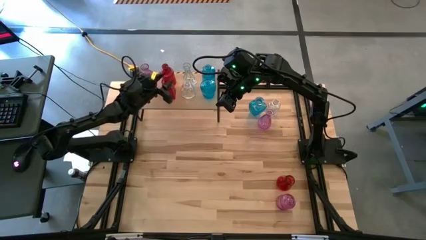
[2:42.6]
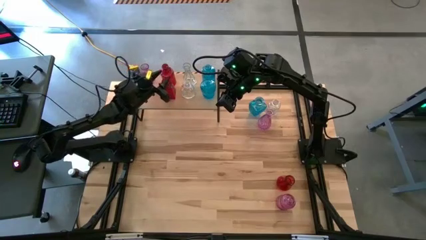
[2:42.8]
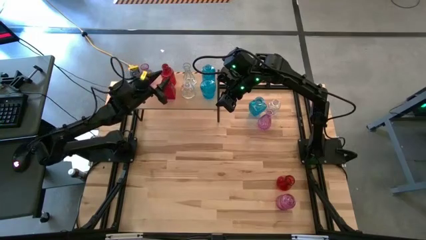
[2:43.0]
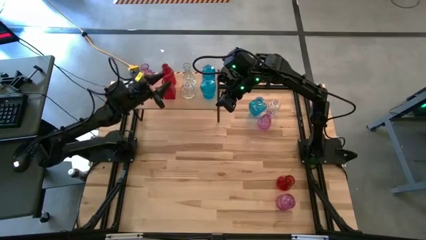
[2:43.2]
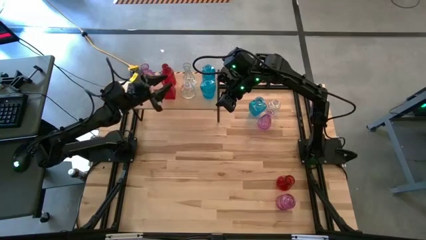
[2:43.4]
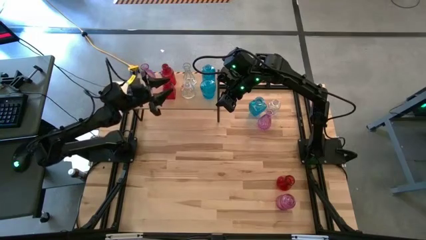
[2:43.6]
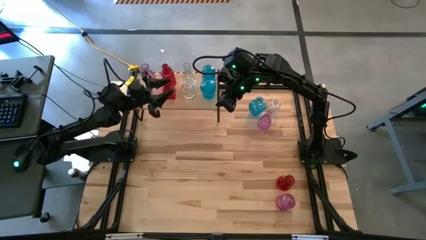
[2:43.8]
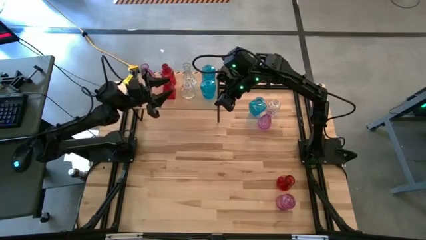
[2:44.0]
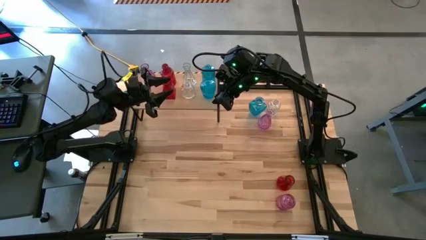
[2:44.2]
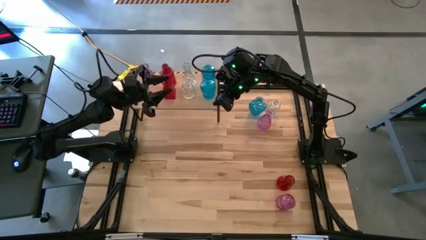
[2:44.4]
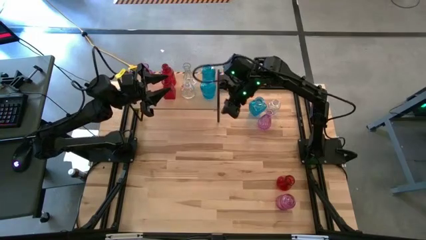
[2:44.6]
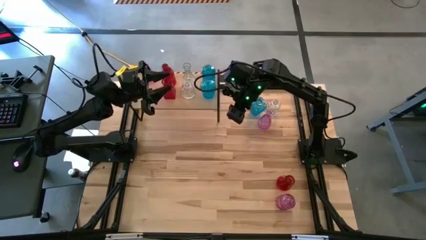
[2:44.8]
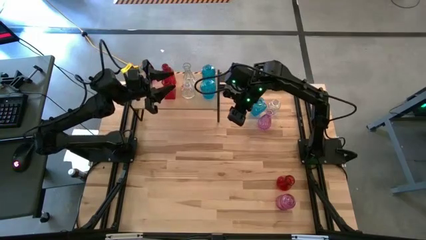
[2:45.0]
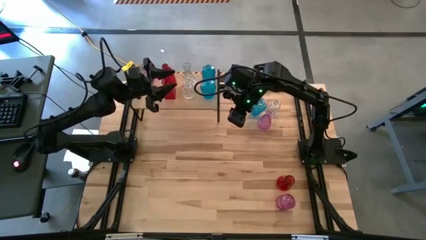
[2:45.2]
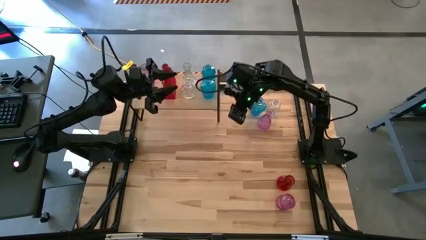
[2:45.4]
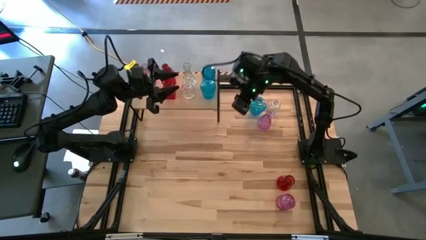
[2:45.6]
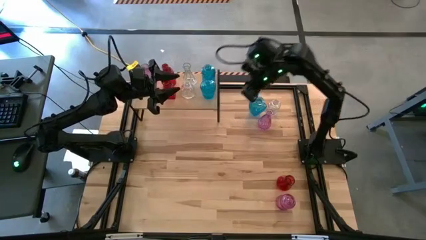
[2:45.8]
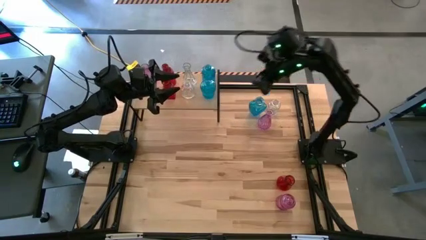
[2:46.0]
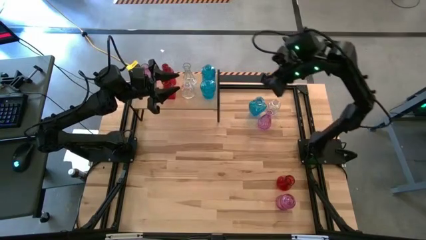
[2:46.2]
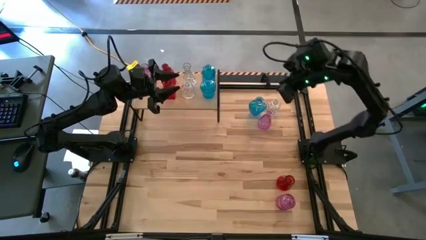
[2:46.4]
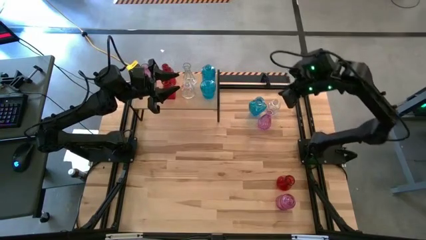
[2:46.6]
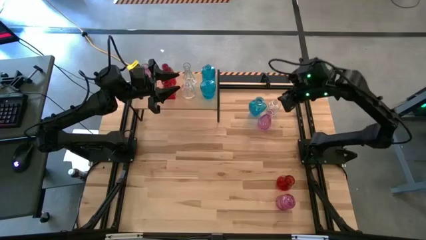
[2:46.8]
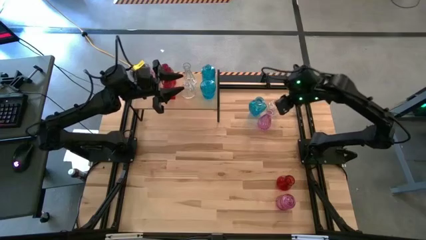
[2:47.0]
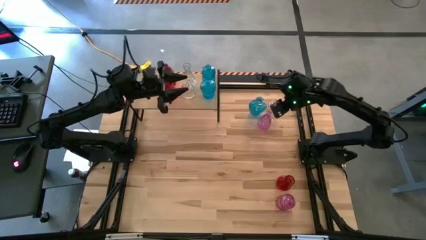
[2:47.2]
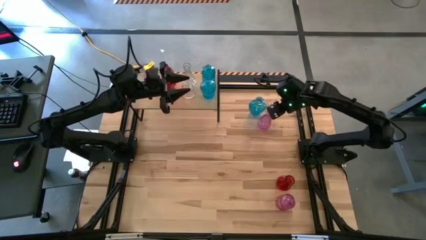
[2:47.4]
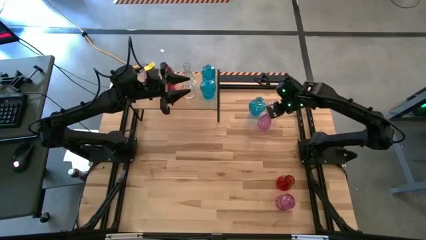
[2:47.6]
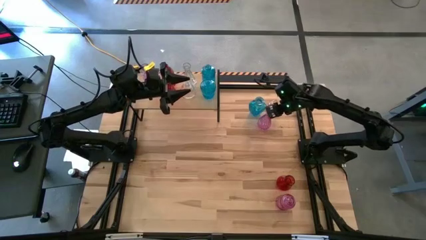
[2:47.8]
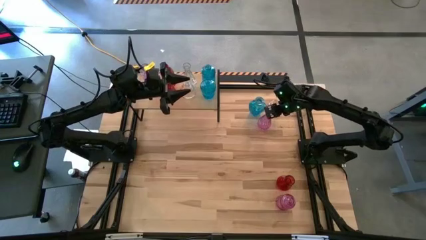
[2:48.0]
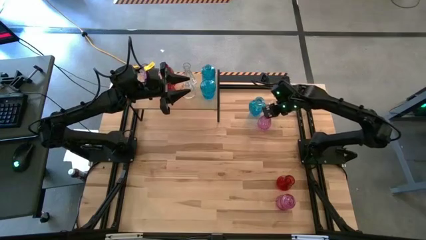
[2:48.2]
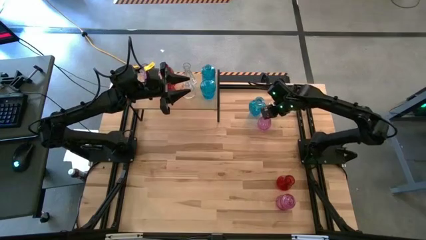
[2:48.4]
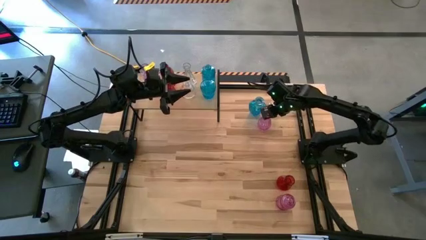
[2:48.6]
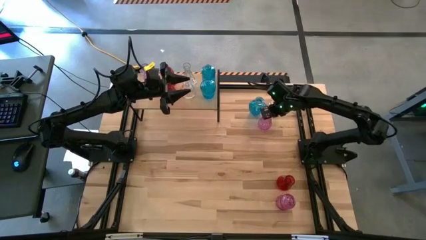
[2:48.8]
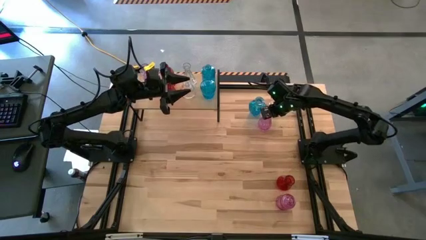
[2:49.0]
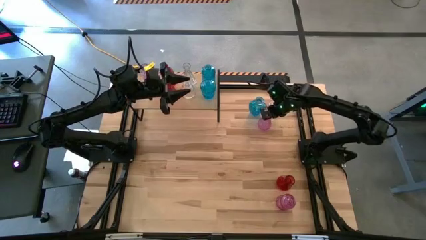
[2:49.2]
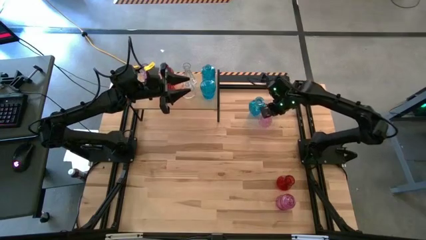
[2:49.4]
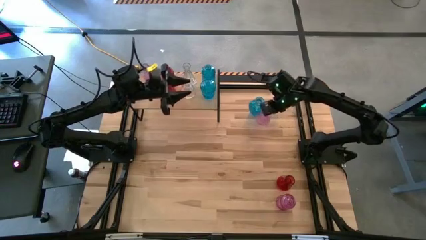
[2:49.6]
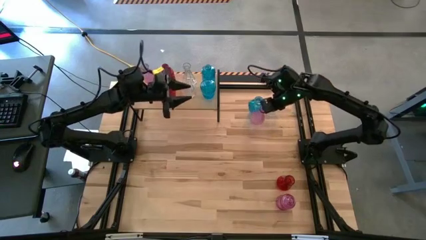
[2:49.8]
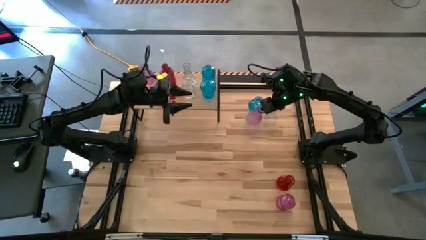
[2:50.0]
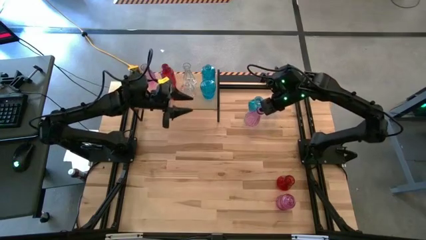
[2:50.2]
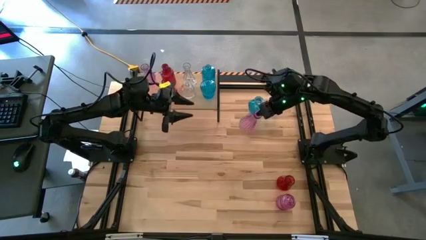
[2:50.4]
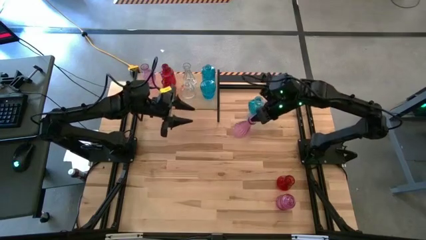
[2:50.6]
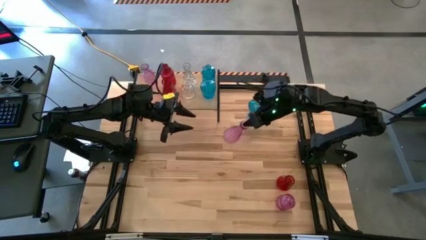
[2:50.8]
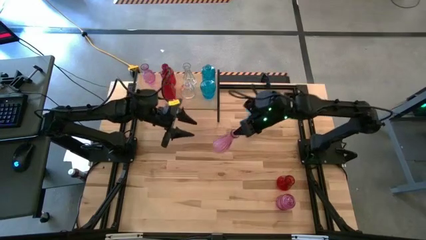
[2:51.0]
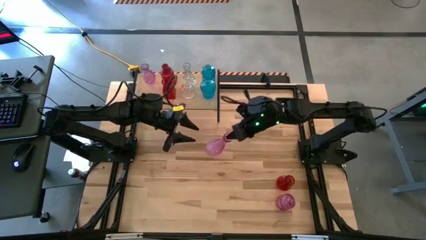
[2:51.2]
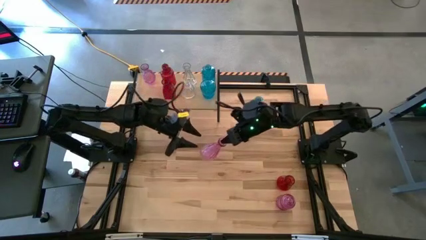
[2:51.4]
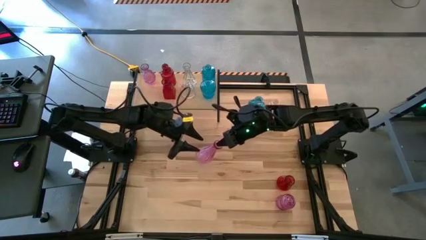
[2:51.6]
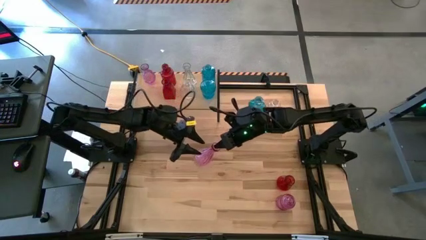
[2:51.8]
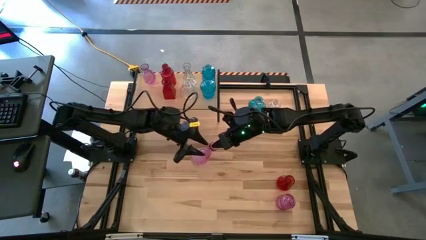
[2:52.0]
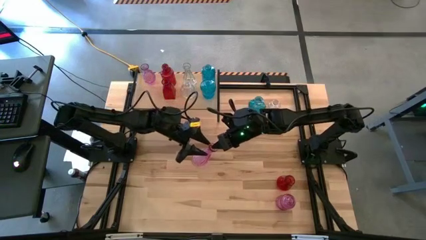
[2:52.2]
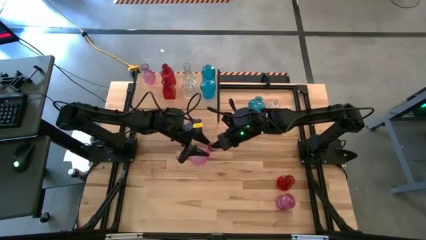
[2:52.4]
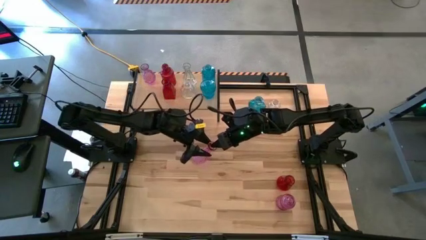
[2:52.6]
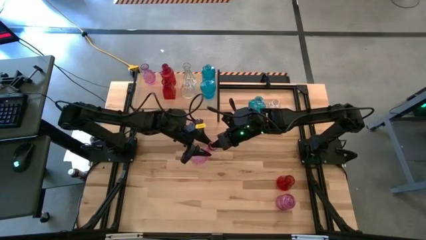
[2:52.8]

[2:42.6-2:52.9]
Task: sort vases onto shelf
Put the top purple vase on the shelf aligned with the other purple vase

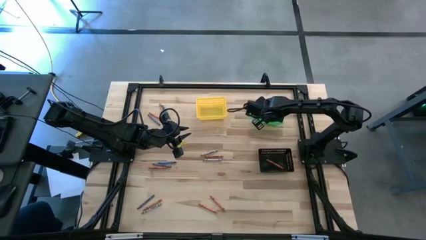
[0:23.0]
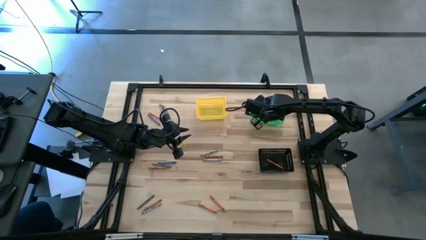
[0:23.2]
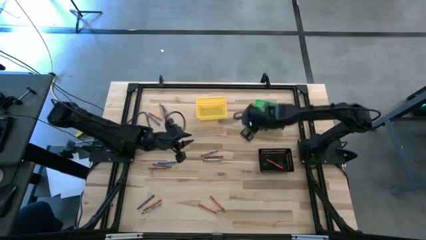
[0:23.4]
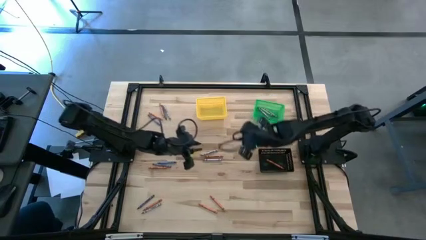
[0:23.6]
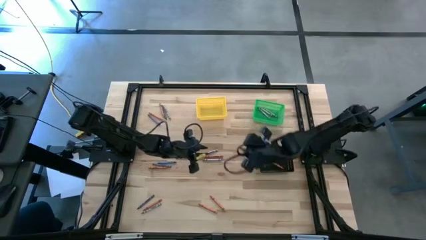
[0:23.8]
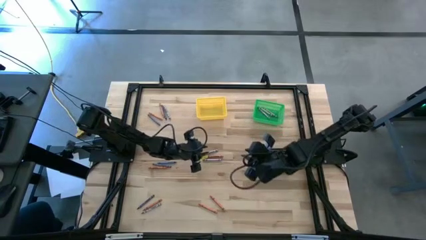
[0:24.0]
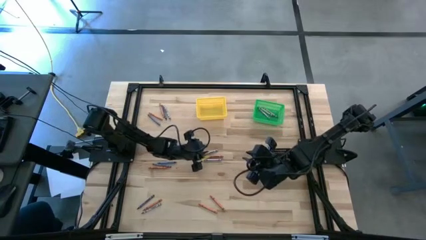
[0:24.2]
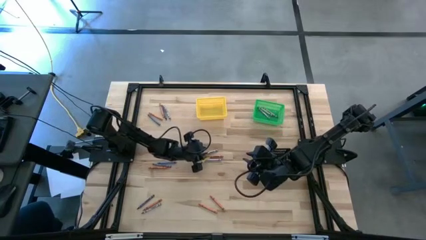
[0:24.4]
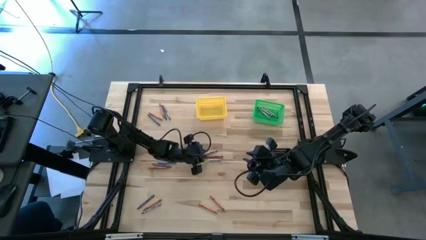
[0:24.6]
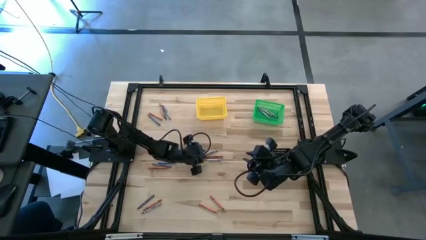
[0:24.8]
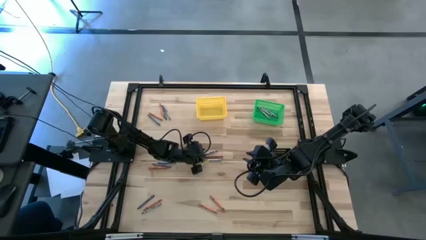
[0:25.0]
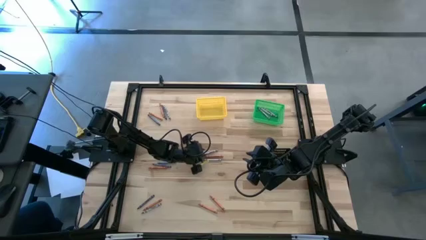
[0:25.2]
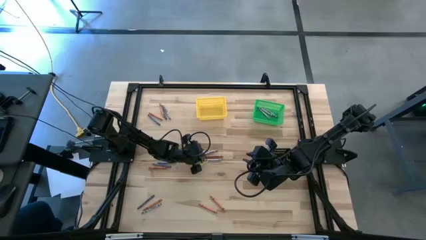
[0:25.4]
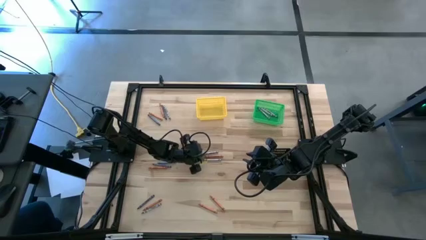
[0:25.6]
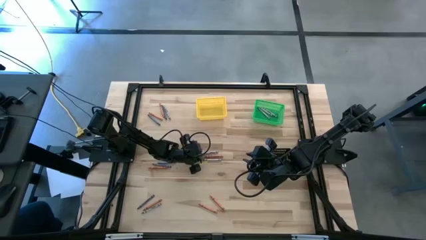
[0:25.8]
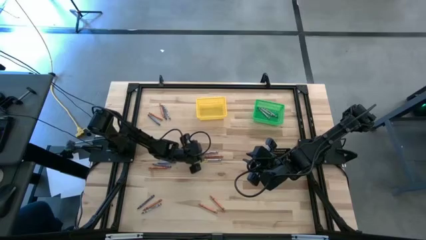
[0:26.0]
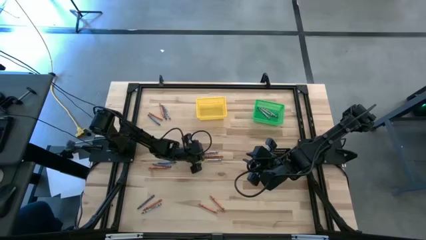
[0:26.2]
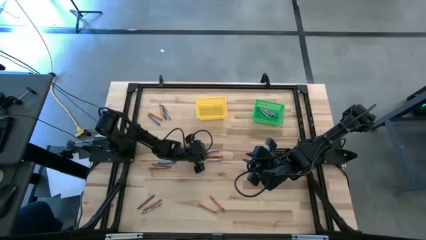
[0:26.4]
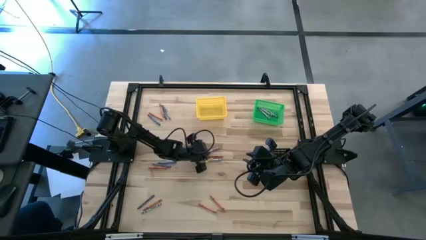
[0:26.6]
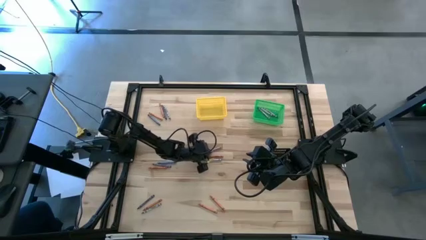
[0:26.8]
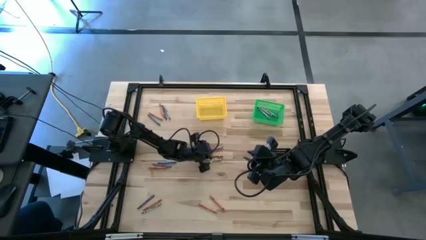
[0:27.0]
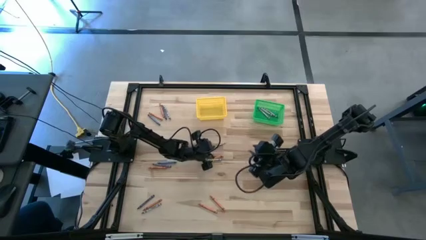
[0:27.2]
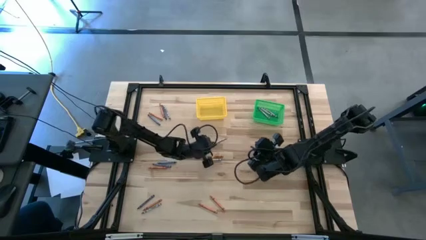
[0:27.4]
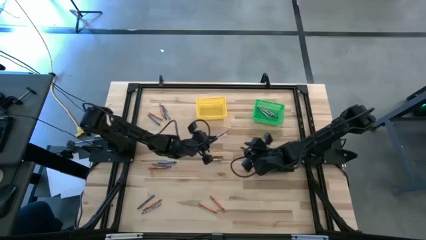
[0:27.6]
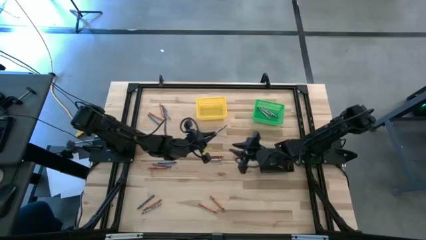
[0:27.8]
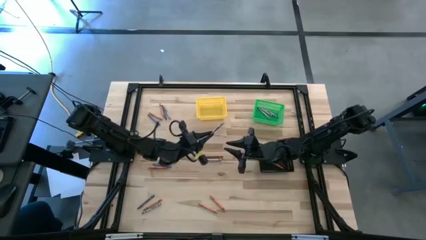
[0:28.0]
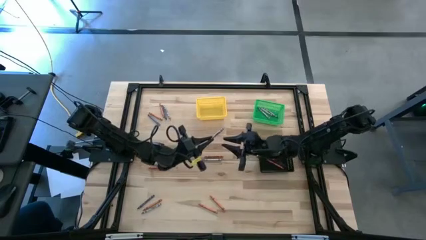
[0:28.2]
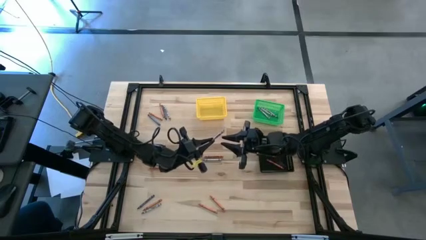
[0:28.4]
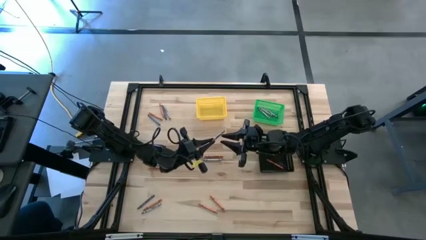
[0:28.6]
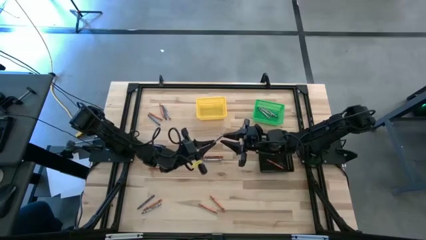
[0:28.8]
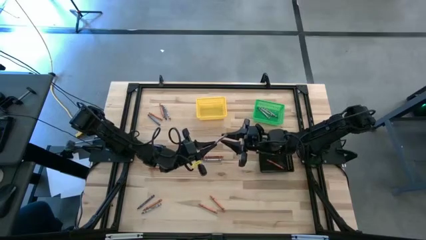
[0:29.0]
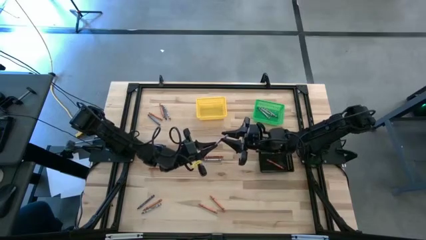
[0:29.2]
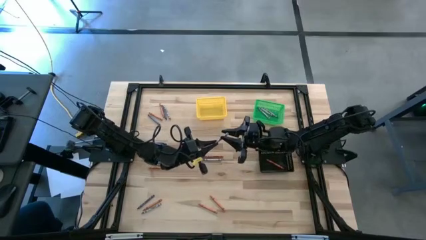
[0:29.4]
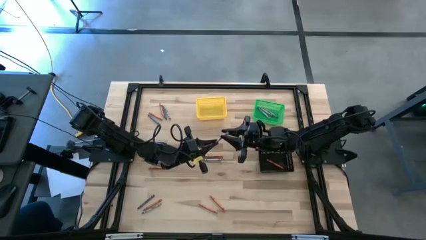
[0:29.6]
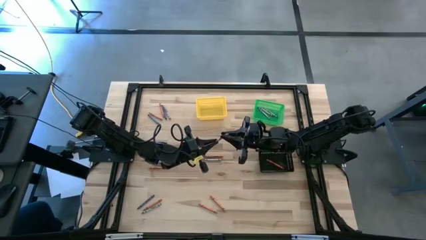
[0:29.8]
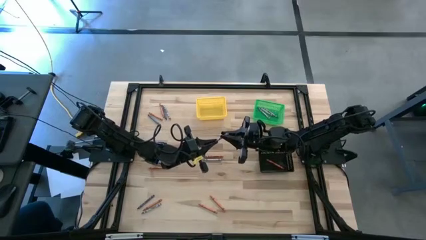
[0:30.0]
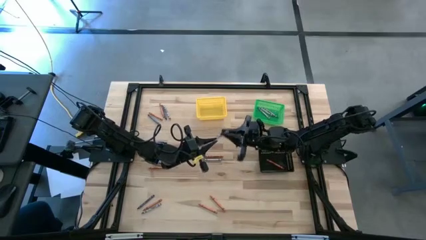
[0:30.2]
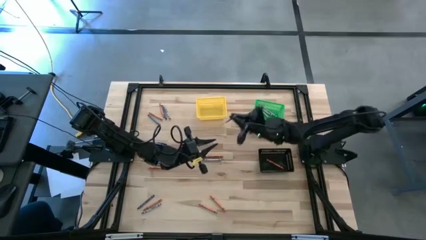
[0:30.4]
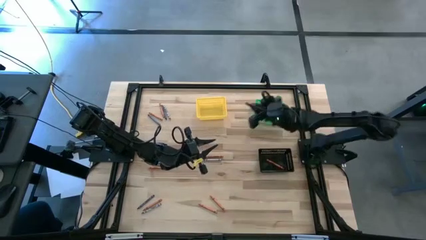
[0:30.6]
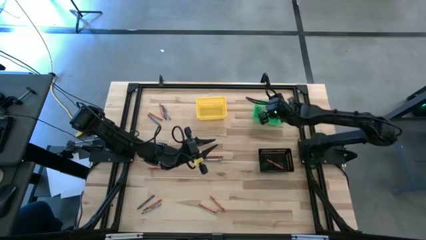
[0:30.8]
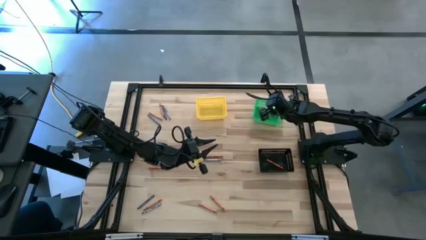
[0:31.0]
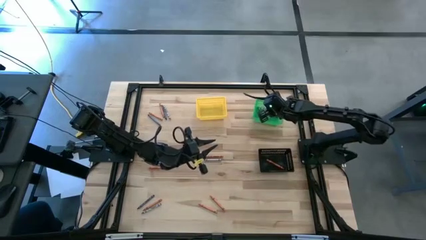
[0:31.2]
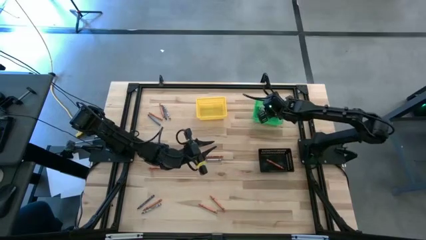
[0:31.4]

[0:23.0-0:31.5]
Task: Sort crayons
Put the gray crayon into the green basket
